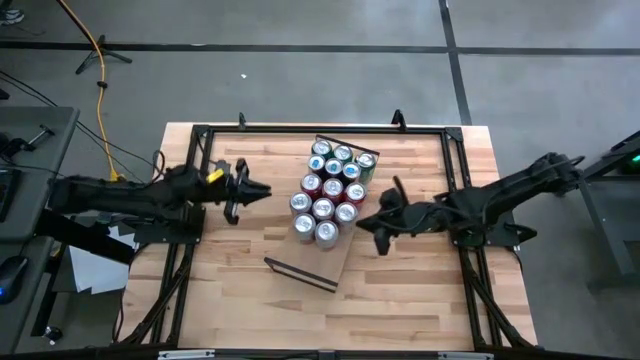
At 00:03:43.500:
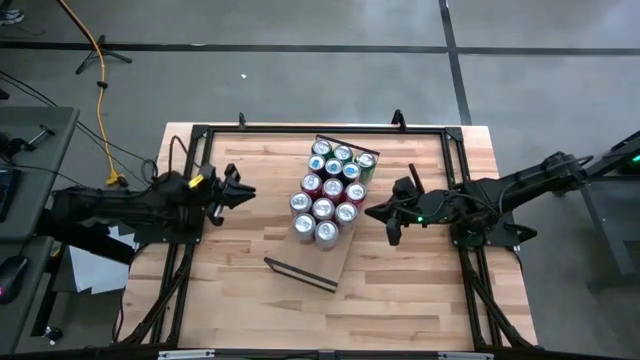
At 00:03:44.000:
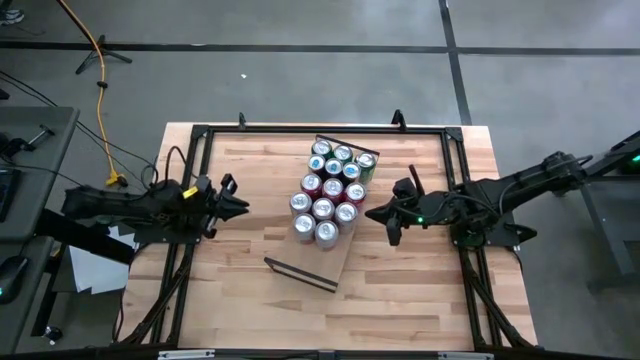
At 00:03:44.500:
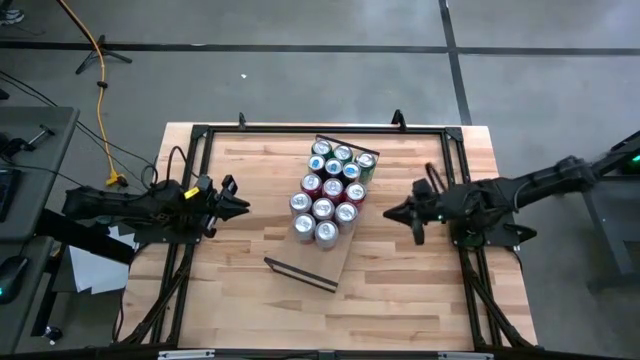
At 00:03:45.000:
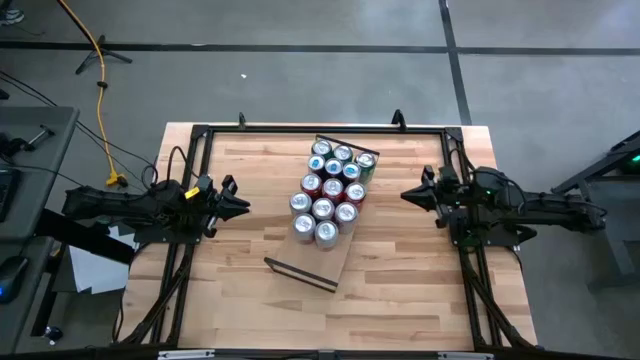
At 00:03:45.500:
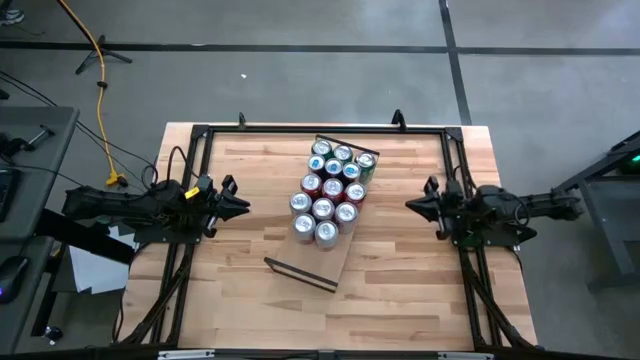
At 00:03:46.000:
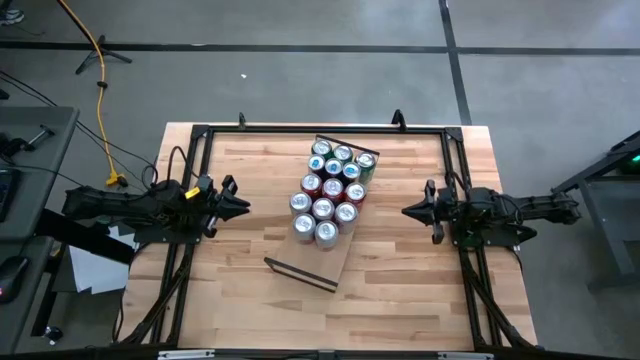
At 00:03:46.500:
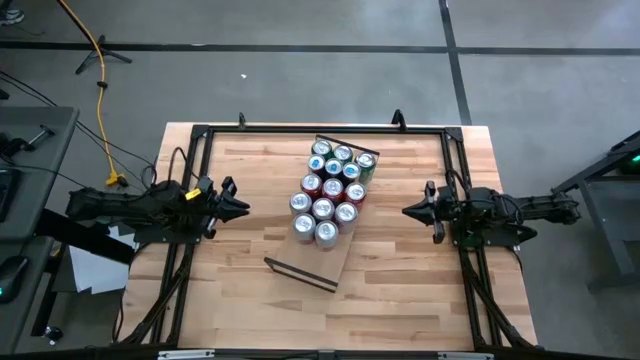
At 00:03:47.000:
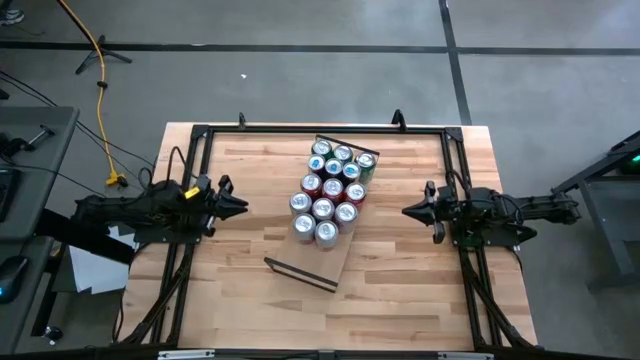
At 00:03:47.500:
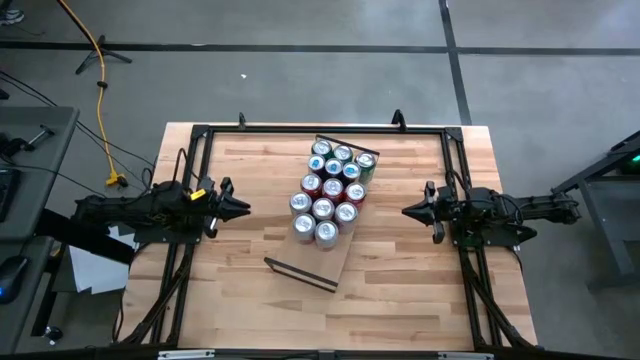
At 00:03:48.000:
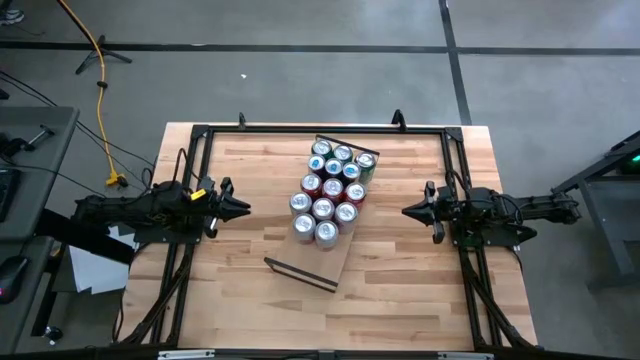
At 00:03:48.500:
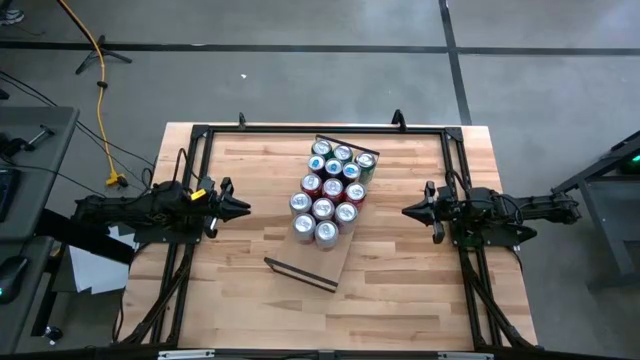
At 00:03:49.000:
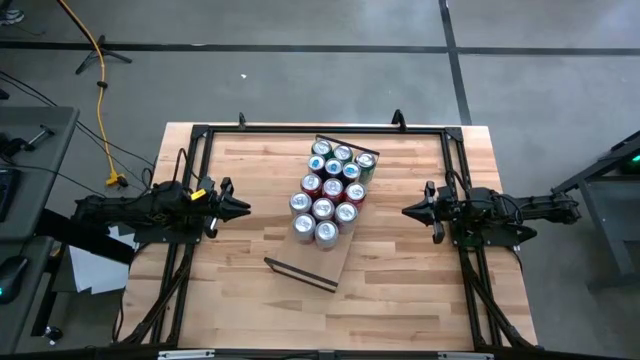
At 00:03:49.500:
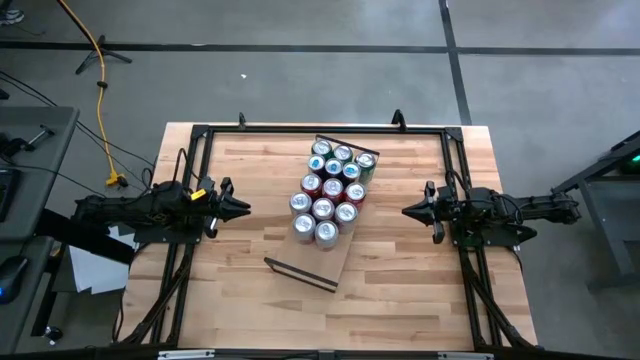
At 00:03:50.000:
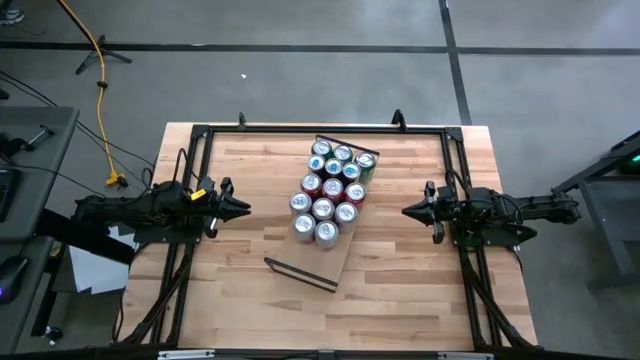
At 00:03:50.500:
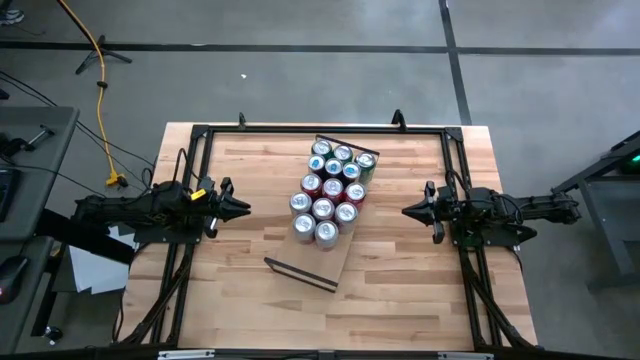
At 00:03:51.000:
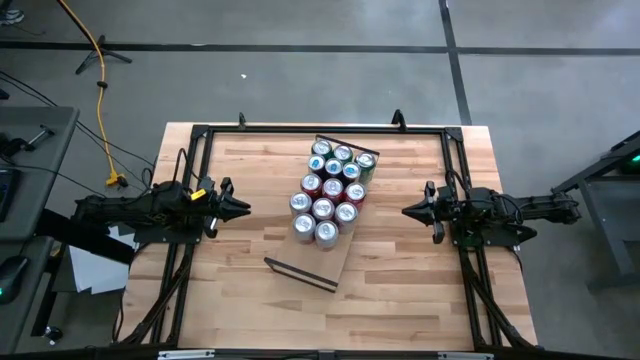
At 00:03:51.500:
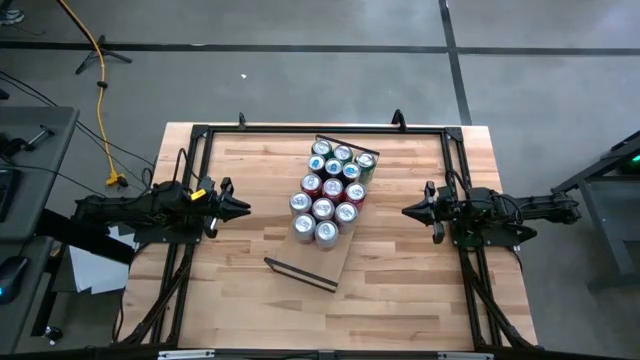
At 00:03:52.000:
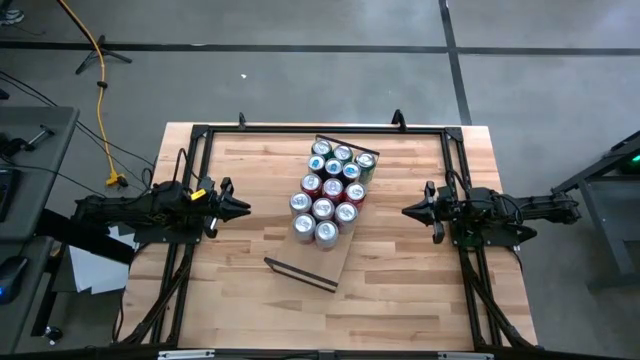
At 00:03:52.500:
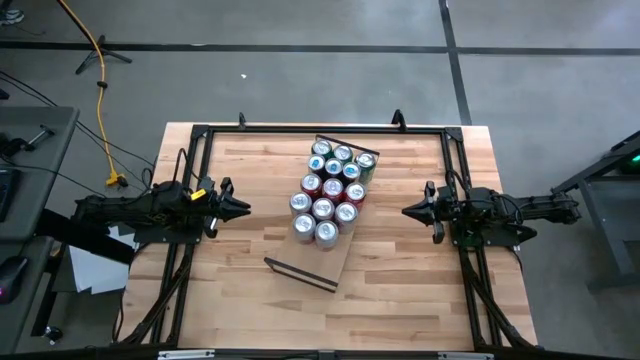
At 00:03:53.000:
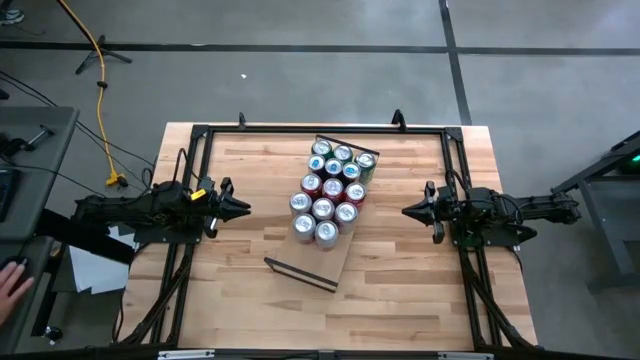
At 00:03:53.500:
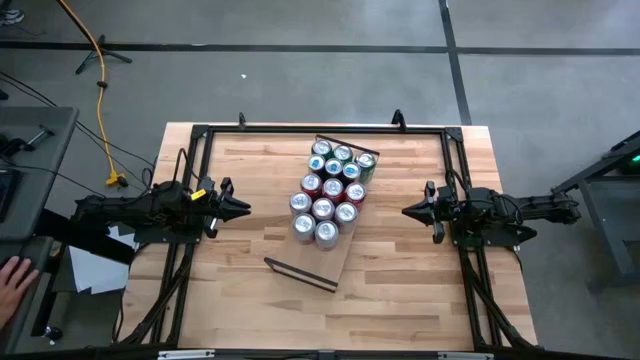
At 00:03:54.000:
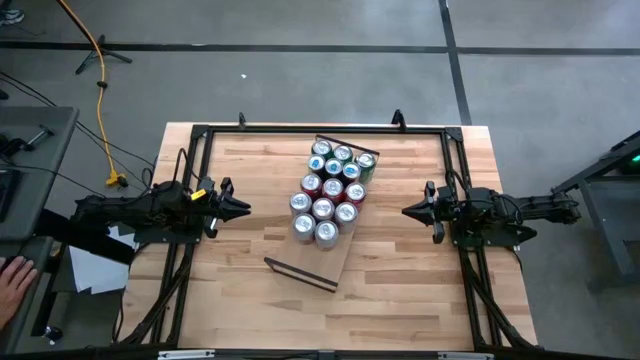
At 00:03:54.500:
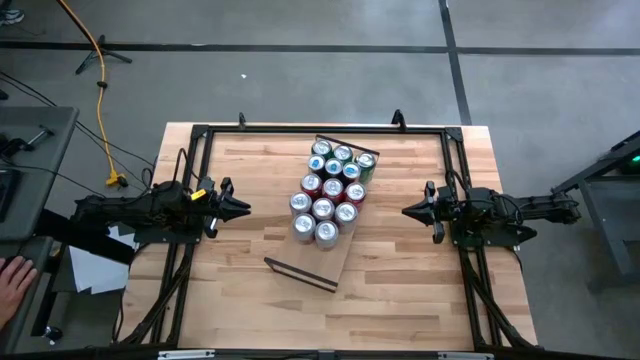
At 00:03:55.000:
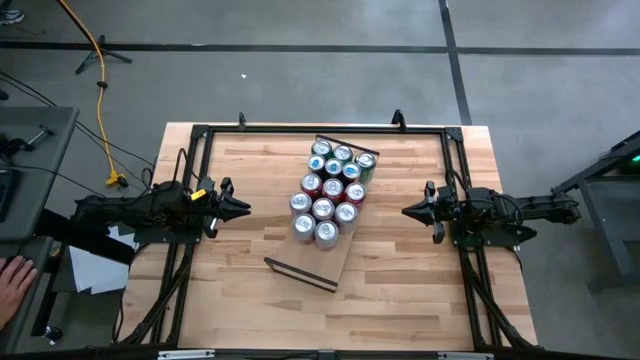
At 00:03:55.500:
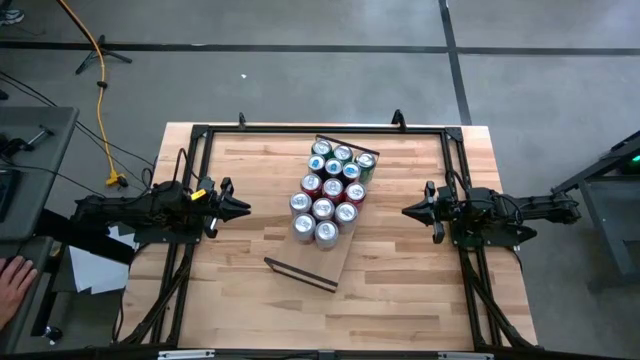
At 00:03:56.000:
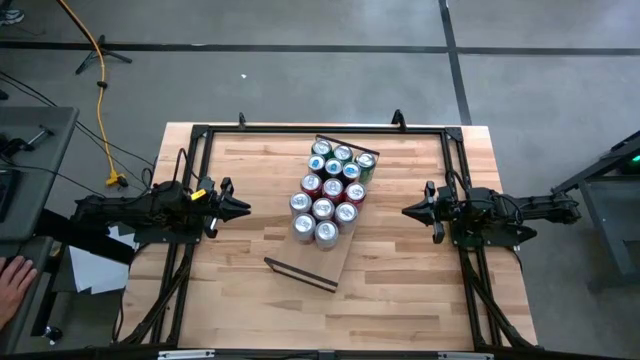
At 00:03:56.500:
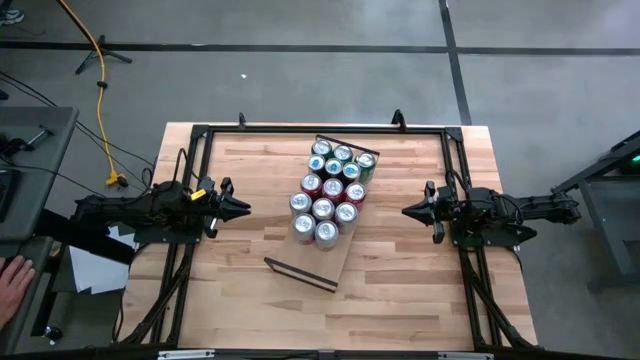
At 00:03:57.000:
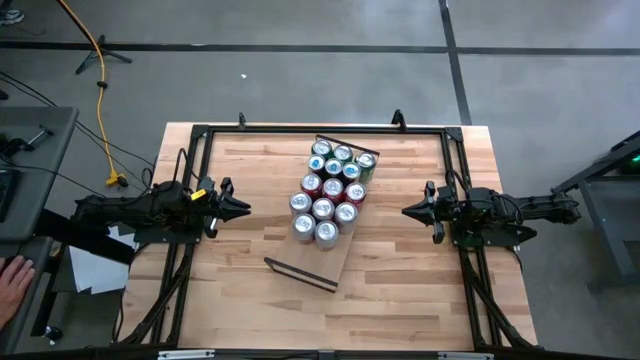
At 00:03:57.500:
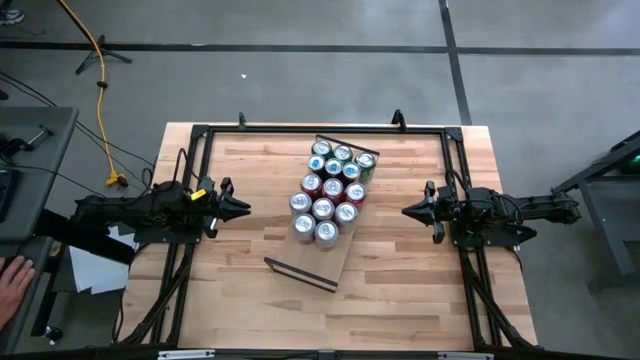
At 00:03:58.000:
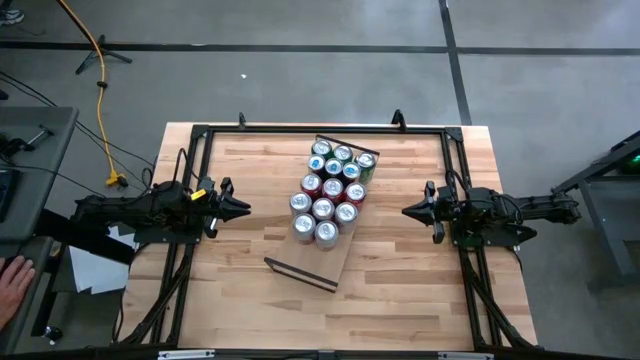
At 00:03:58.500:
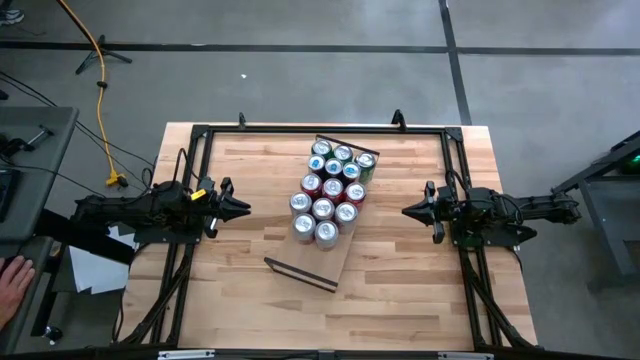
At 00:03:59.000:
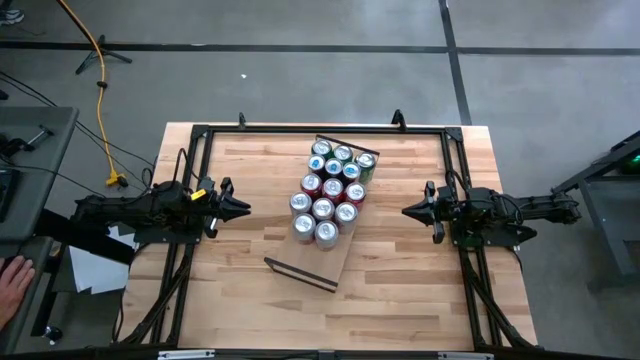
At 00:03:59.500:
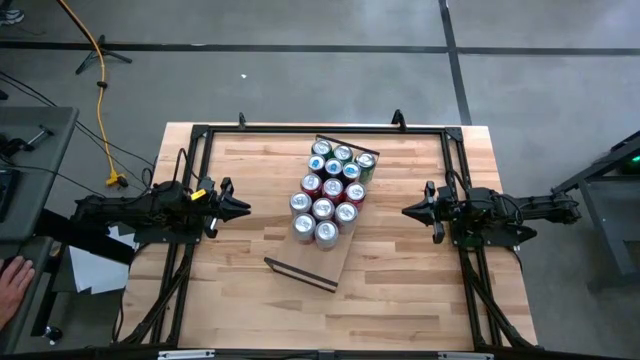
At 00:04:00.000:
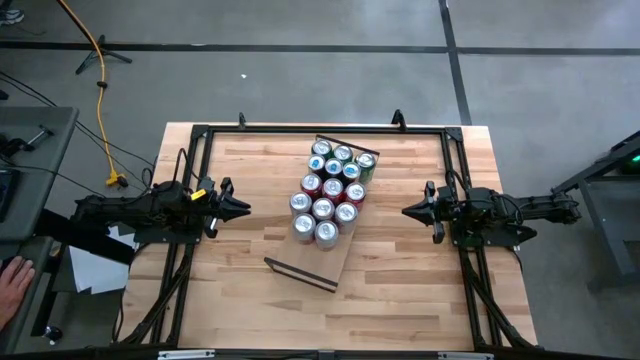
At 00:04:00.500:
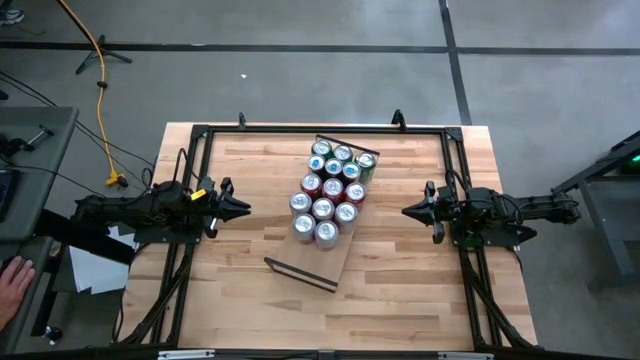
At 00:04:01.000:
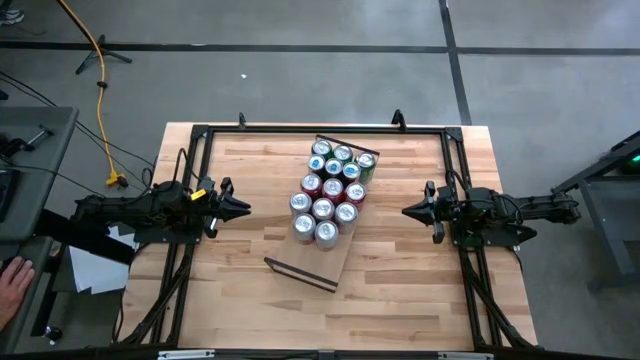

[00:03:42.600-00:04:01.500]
Task: Place canned beverage on shelf
Return to Home Position
